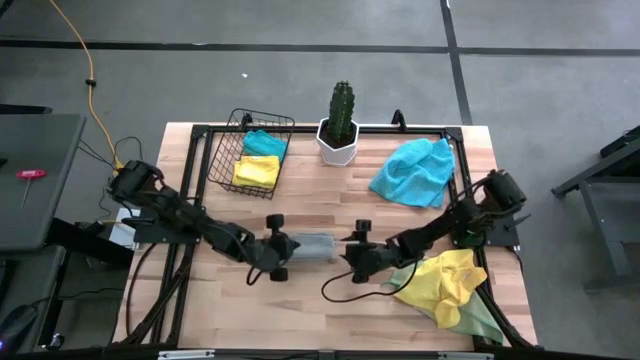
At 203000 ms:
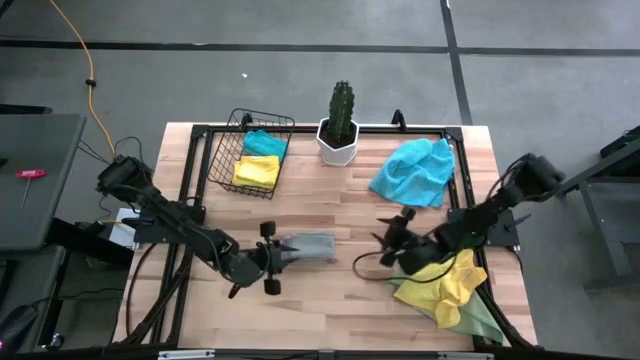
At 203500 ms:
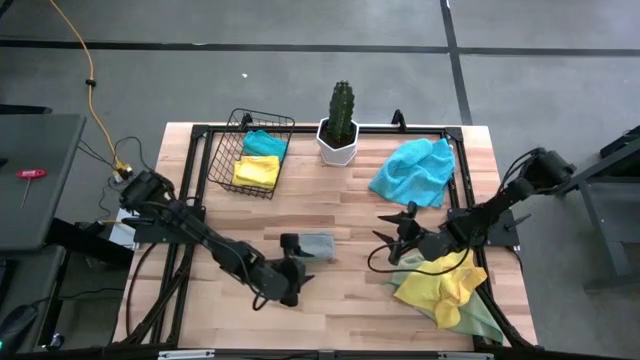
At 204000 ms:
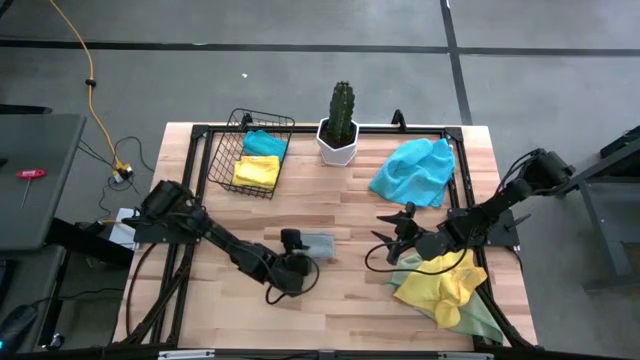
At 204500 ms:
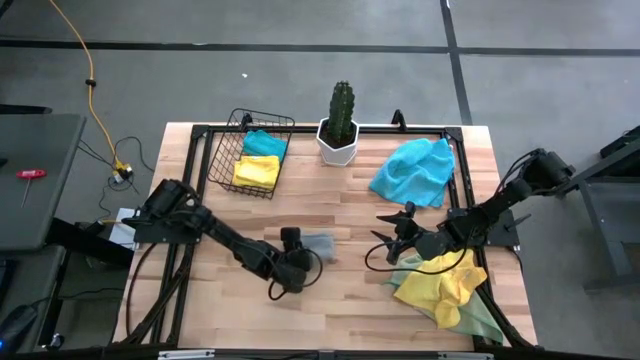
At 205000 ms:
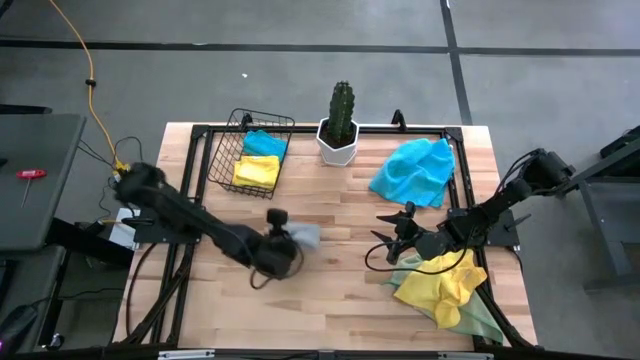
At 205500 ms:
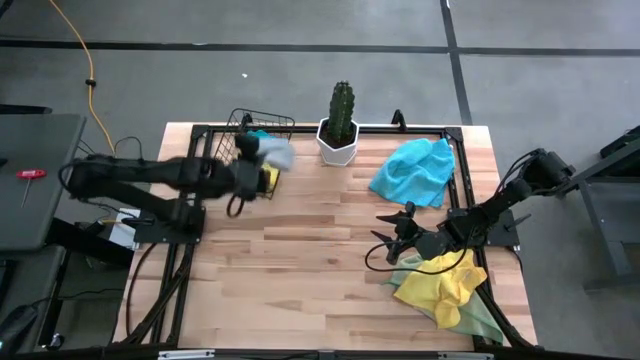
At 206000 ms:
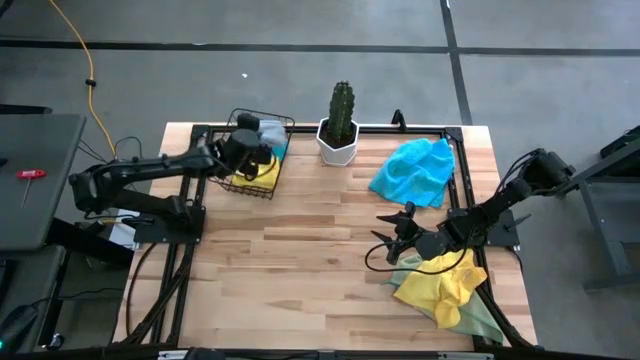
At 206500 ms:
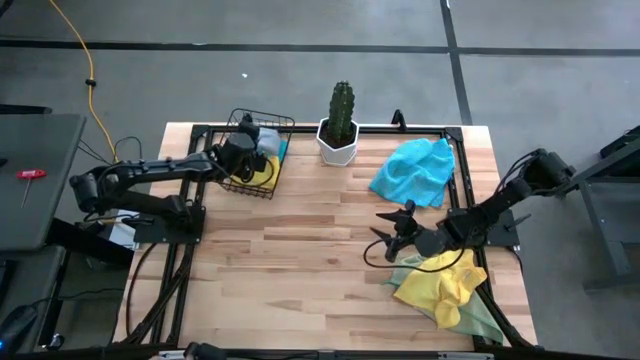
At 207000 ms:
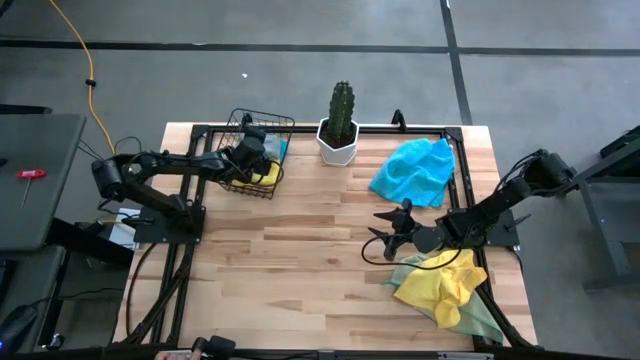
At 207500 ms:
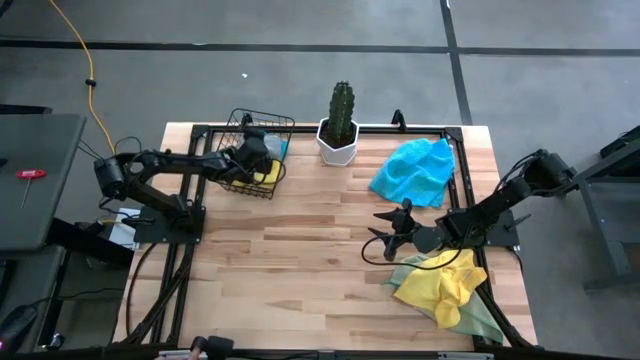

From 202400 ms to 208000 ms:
Task: Fold microfiber towels
Put the folded gray microfiber towel into the mesh basket

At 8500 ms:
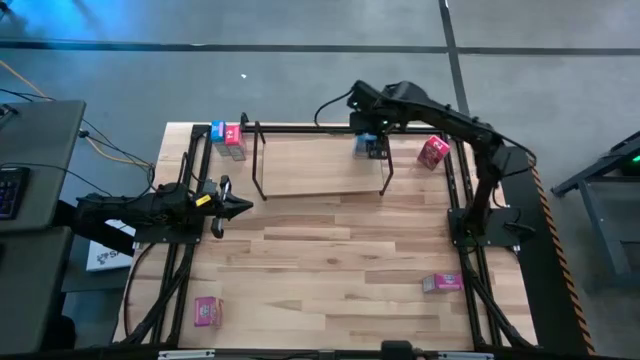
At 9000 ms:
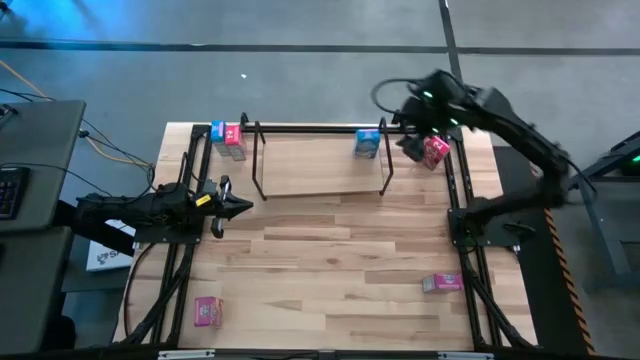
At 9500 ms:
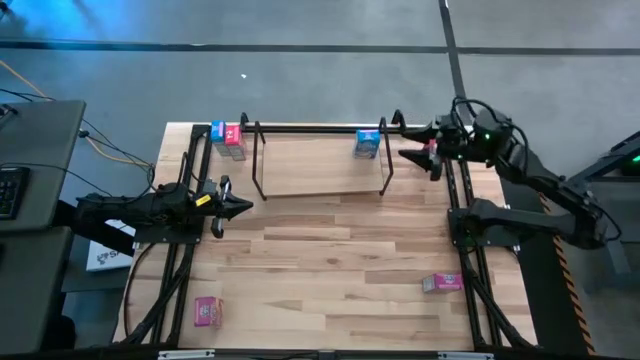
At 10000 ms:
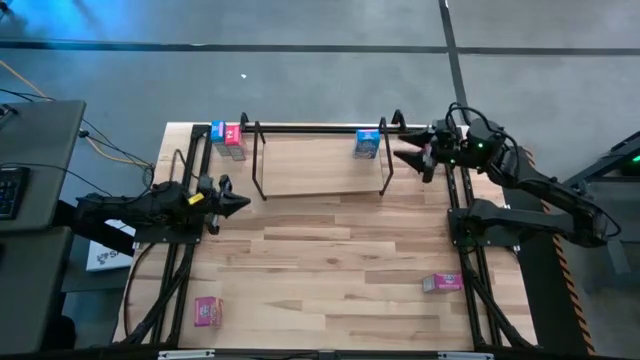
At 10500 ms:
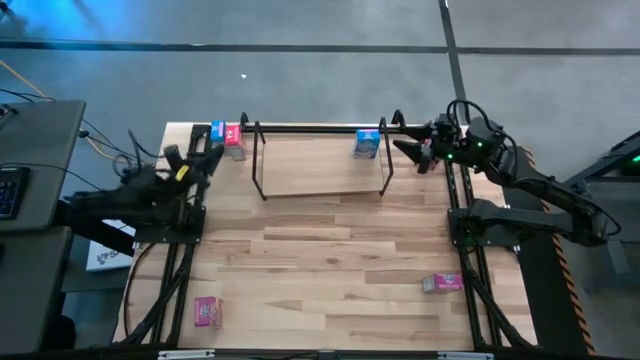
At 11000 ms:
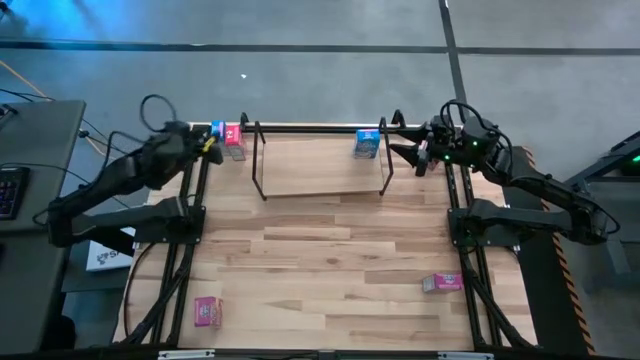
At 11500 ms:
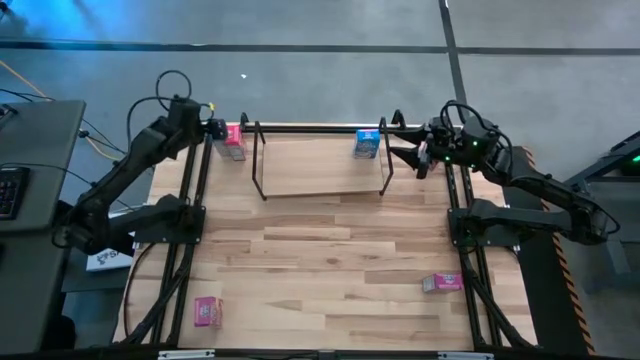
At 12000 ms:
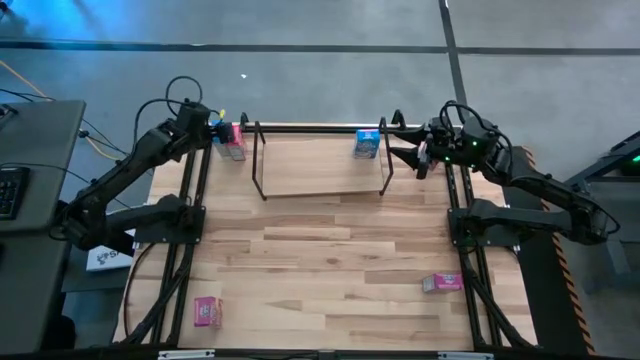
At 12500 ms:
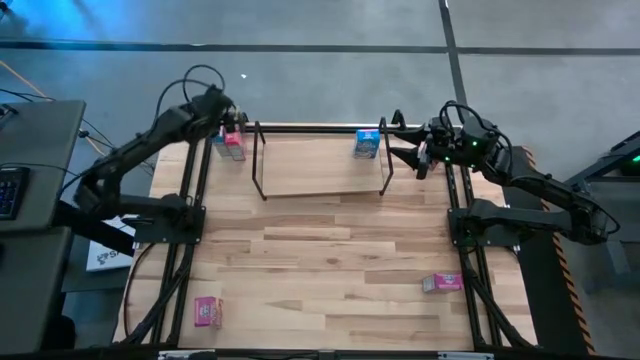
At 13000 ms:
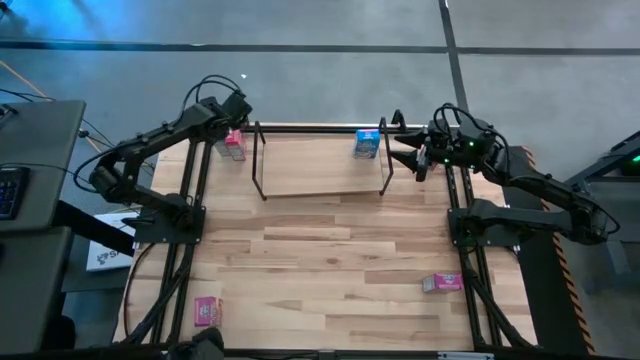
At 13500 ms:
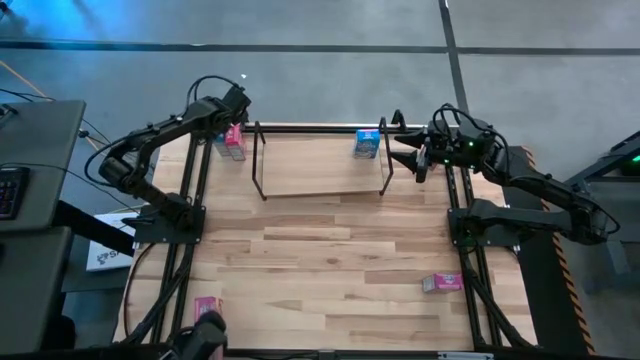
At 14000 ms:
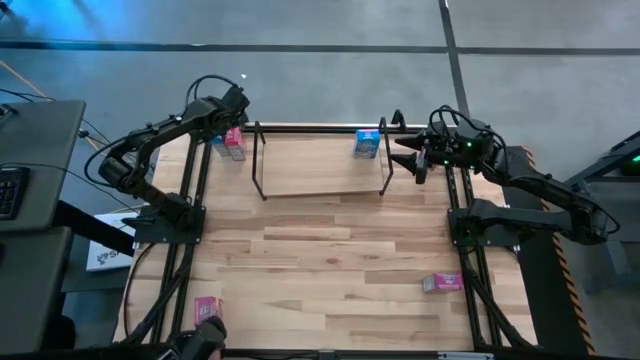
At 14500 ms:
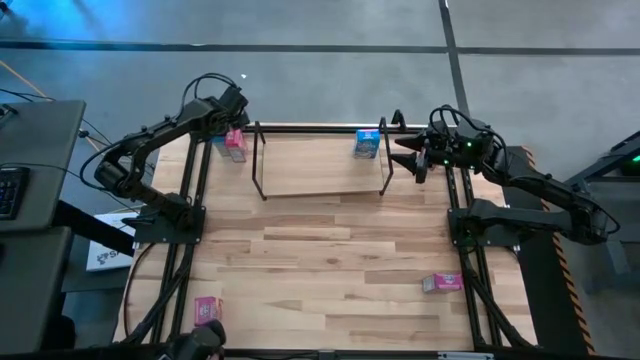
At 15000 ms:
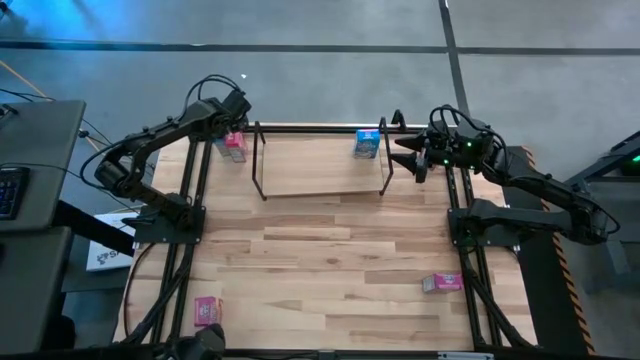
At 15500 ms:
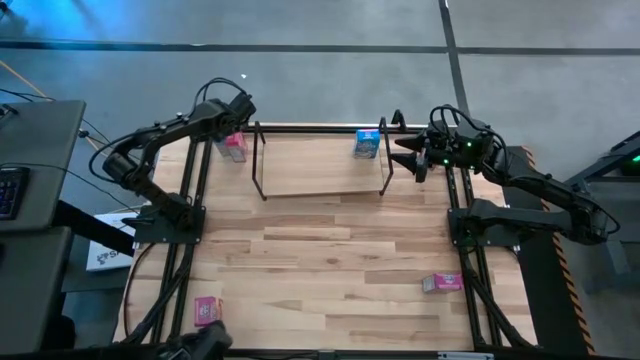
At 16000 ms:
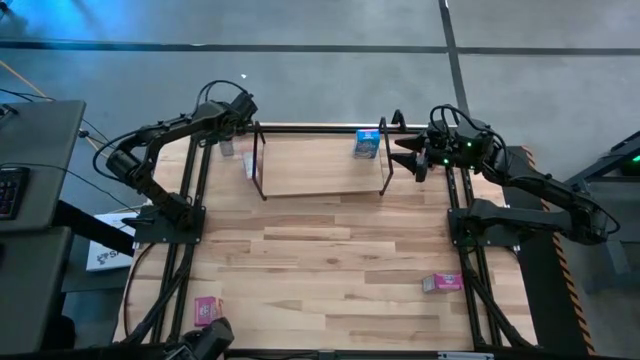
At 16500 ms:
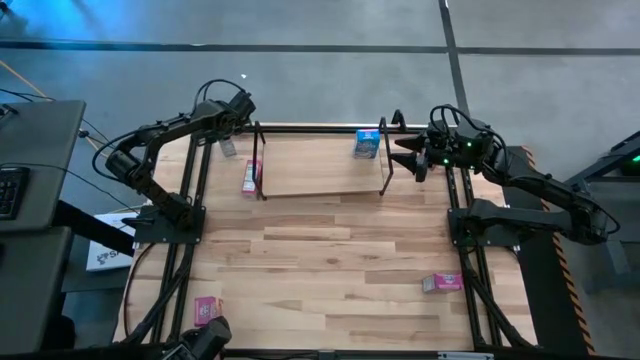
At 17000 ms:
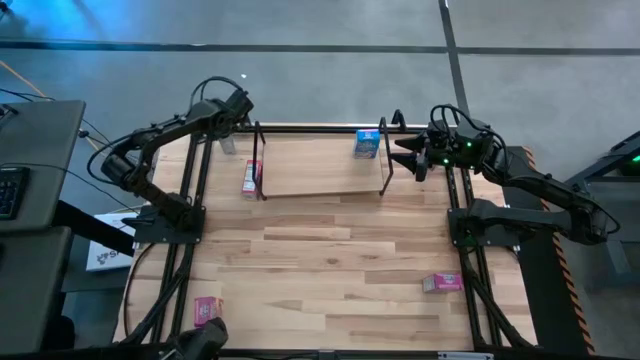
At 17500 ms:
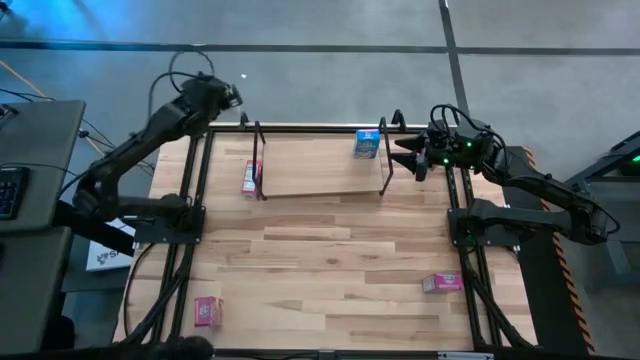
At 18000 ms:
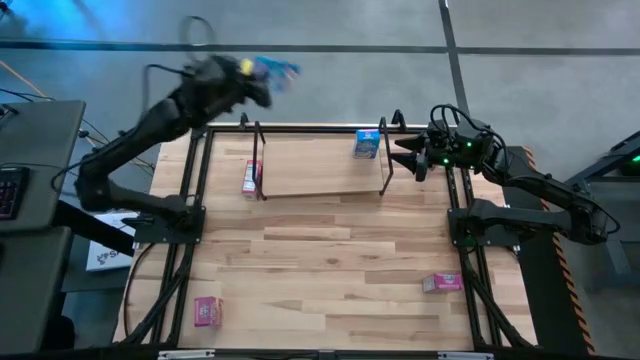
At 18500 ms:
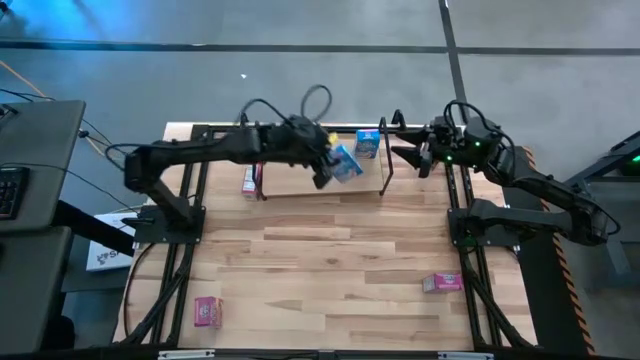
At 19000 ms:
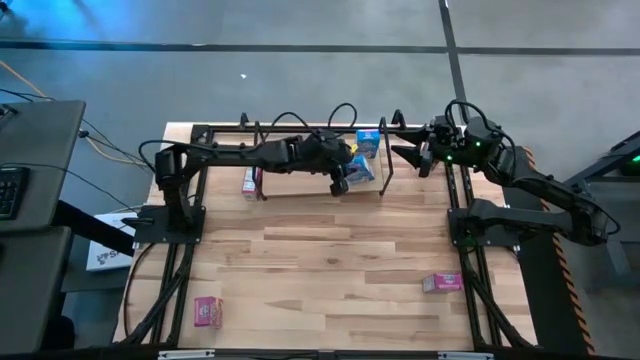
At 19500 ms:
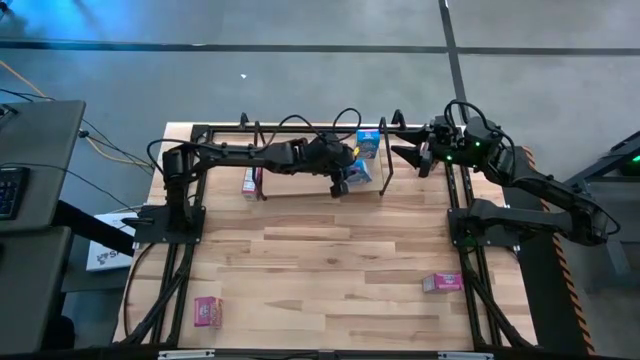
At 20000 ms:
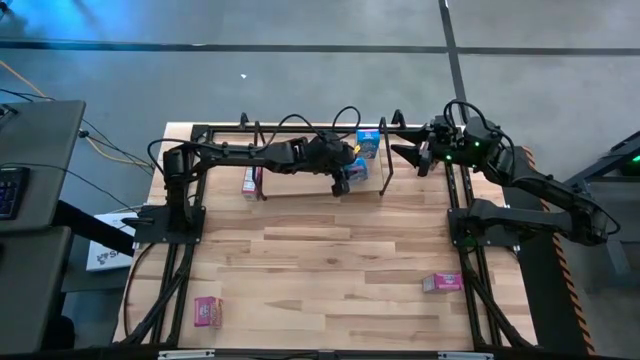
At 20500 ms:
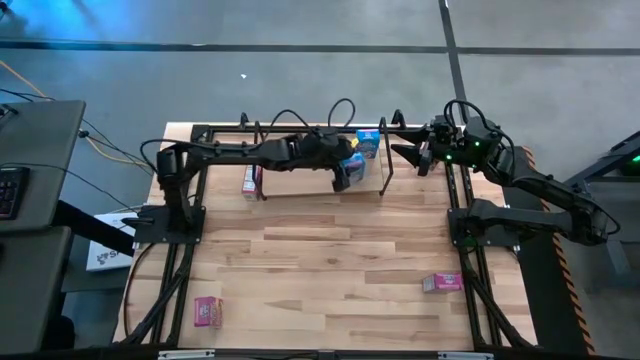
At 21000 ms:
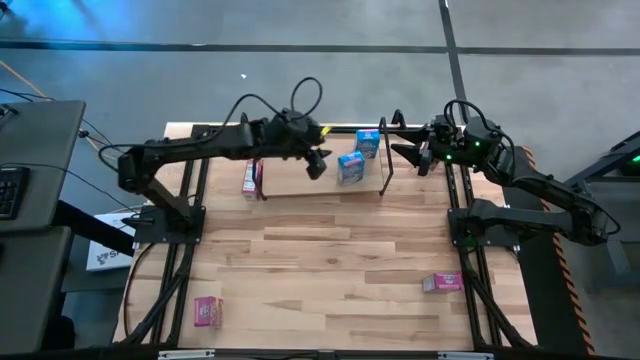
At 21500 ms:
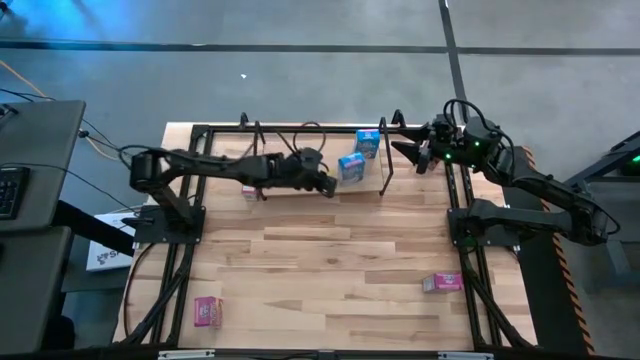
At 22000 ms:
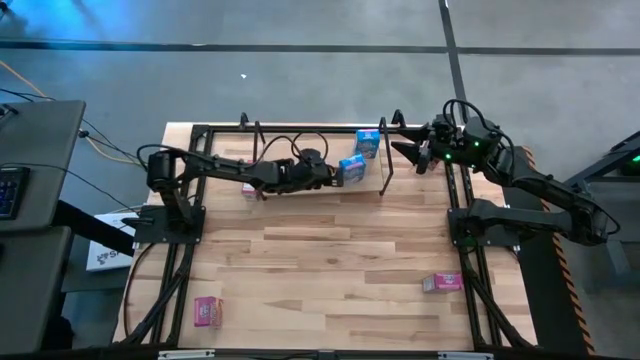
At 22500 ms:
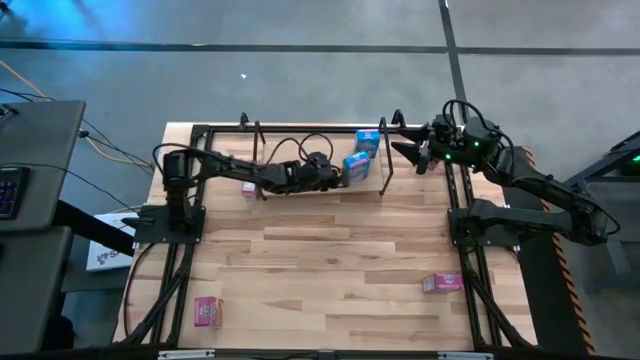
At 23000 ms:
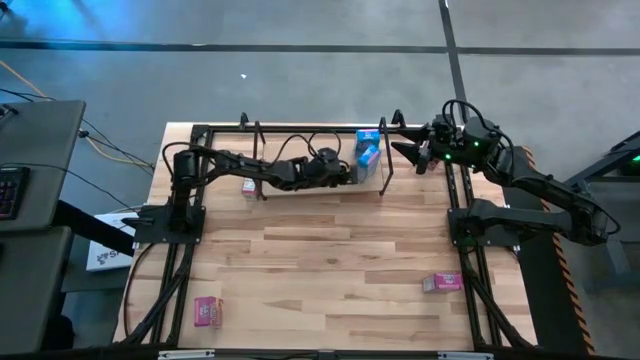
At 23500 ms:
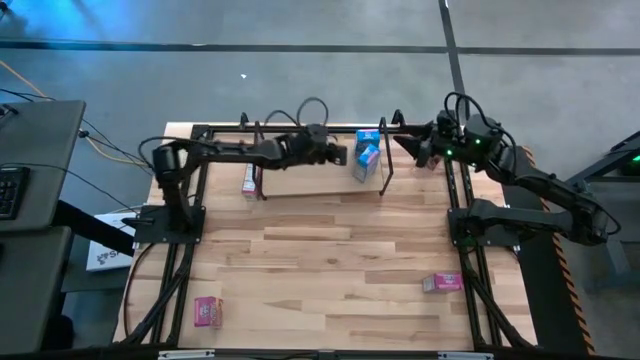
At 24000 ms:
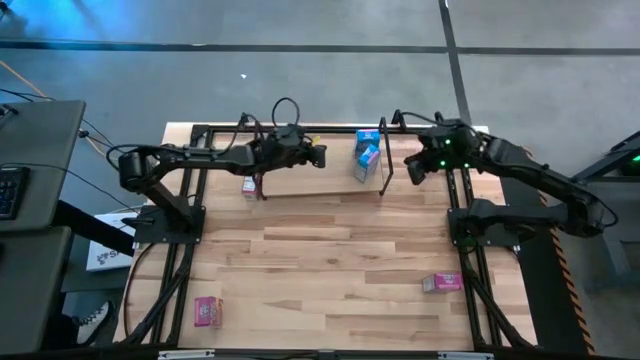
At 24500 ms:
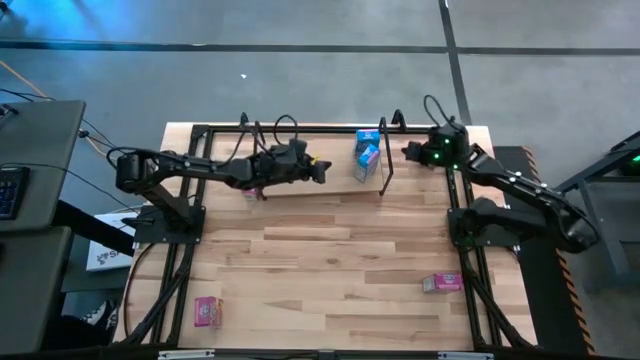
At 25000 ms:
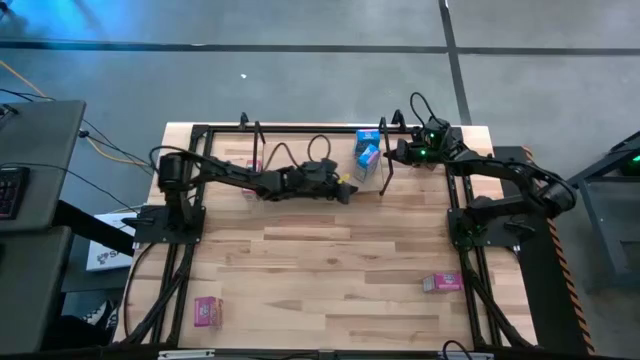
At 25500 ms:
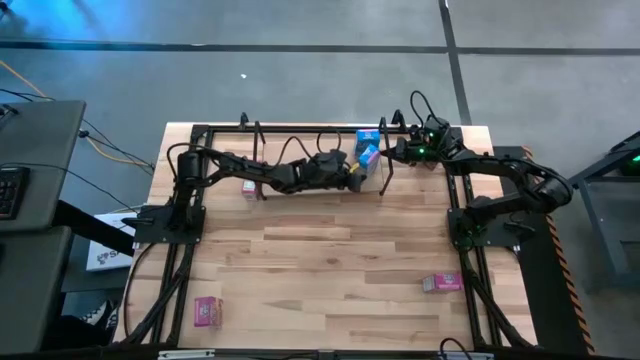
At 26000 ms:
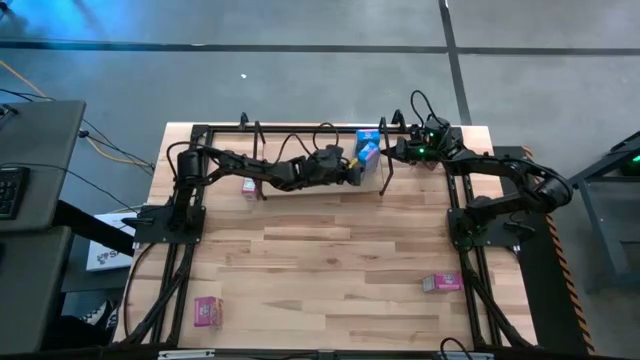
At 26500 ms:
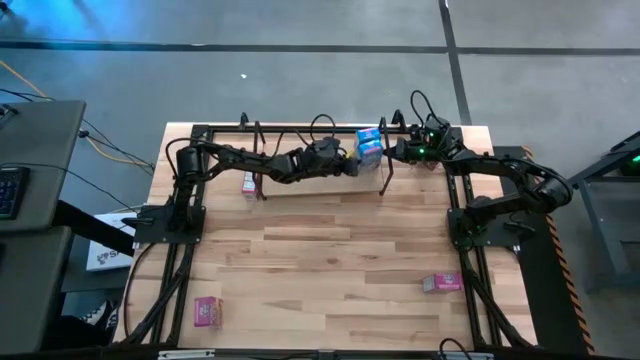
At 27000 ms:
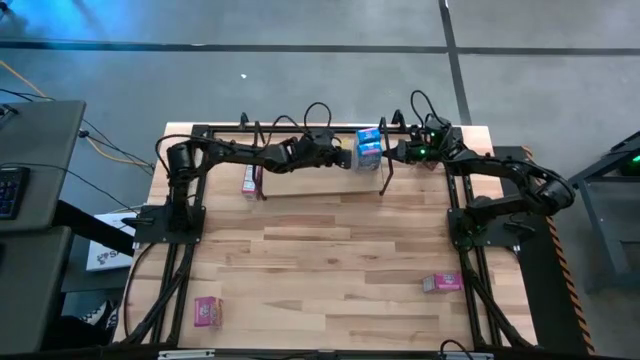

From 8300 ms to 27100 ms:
Task: Stack cereal on shelf
Put the blue cereal box on the shelf aligned with the other blue cereal box
